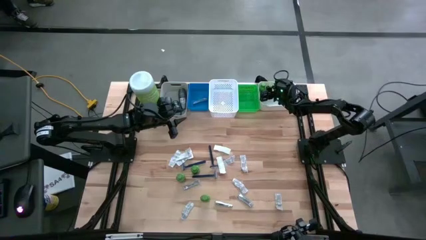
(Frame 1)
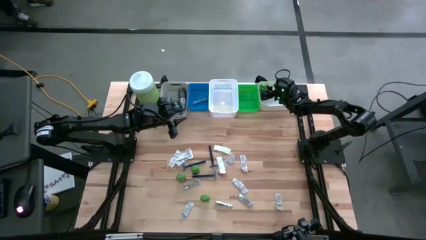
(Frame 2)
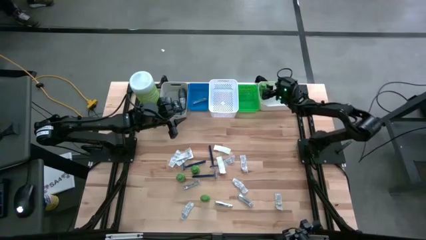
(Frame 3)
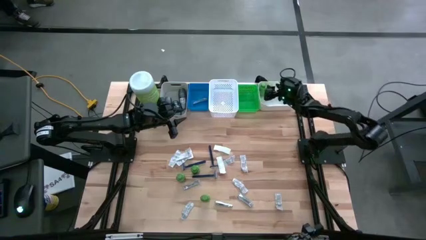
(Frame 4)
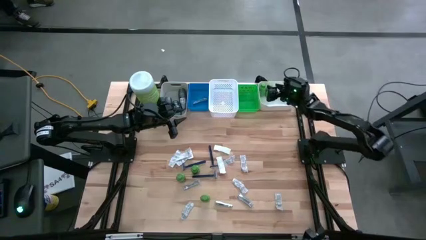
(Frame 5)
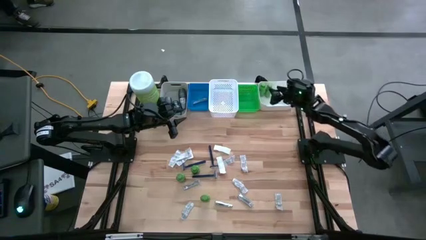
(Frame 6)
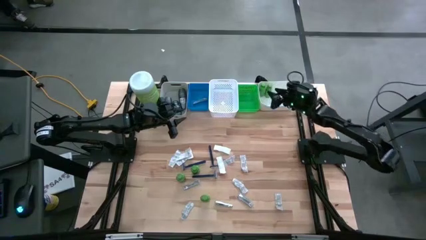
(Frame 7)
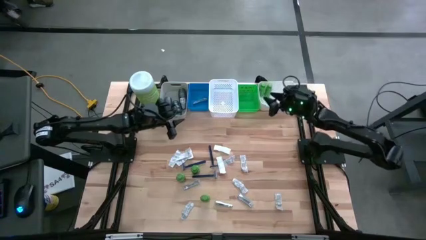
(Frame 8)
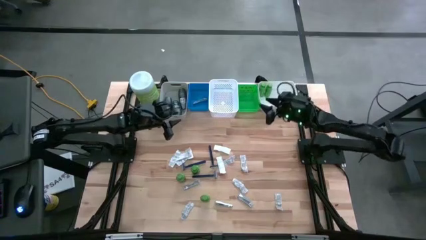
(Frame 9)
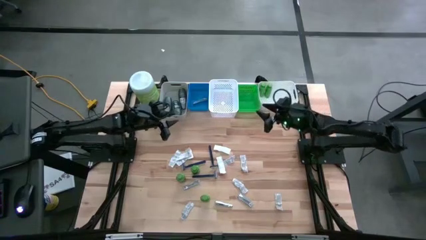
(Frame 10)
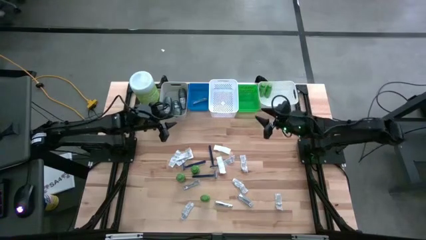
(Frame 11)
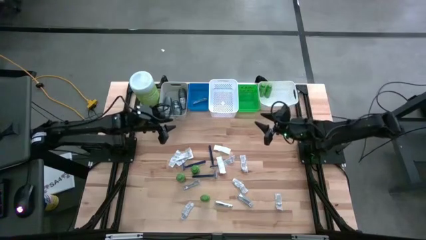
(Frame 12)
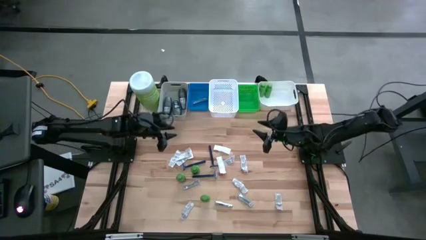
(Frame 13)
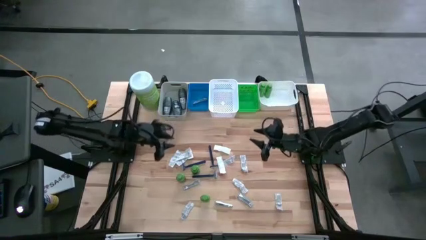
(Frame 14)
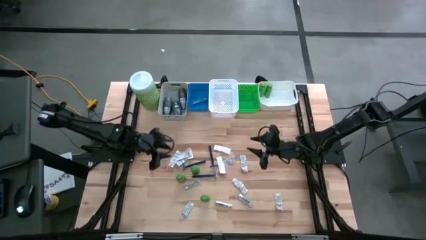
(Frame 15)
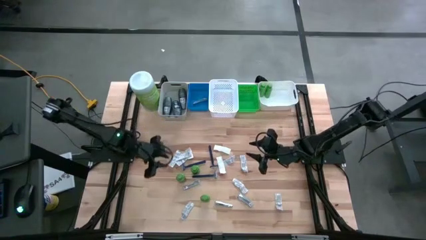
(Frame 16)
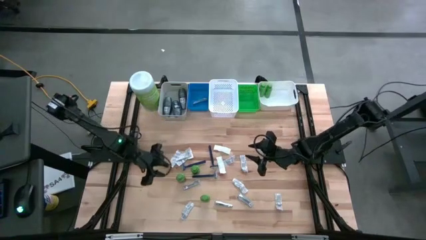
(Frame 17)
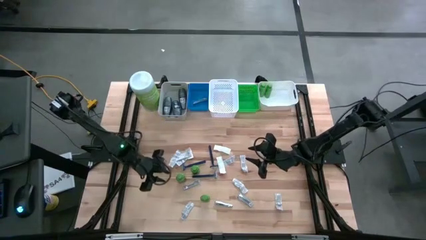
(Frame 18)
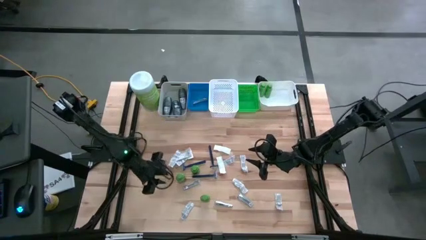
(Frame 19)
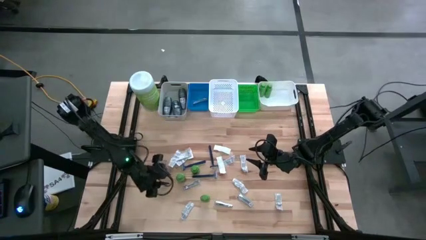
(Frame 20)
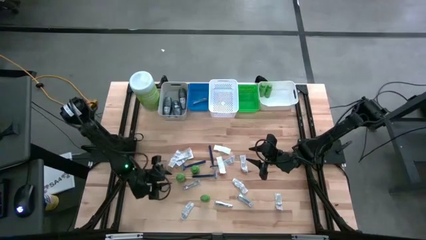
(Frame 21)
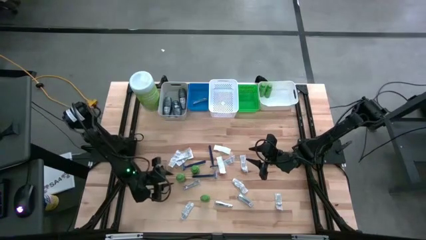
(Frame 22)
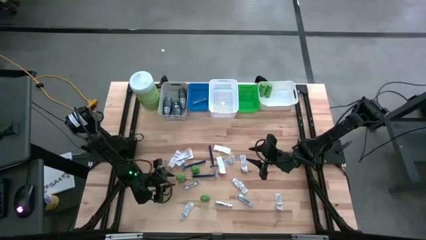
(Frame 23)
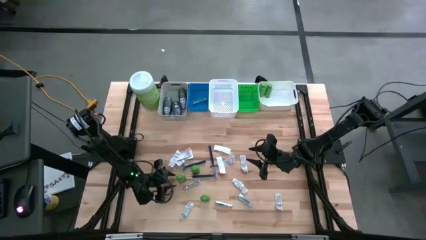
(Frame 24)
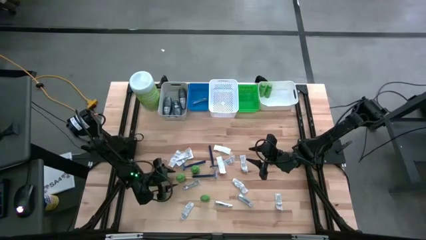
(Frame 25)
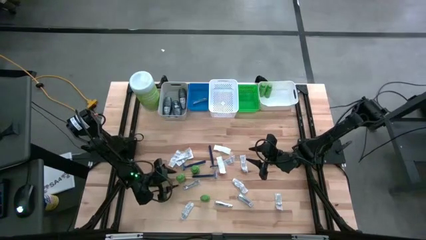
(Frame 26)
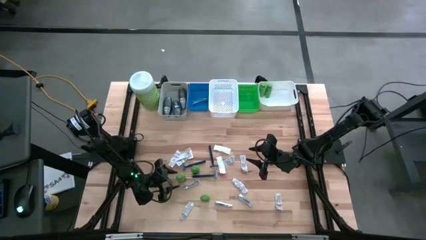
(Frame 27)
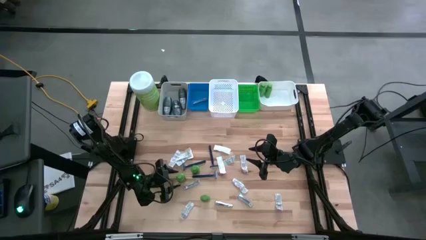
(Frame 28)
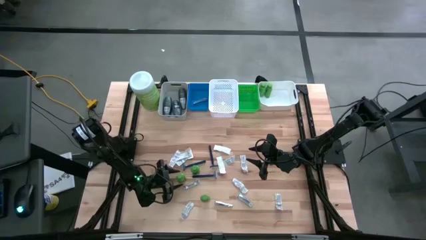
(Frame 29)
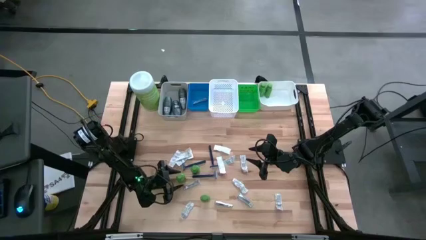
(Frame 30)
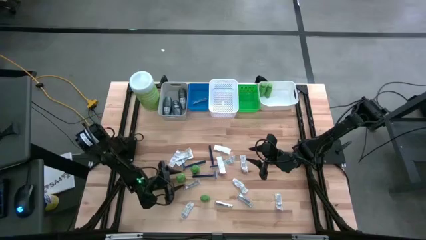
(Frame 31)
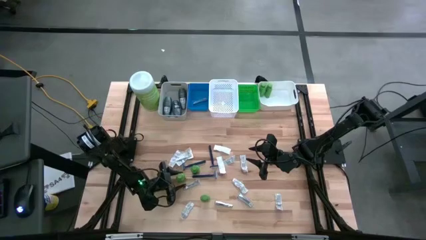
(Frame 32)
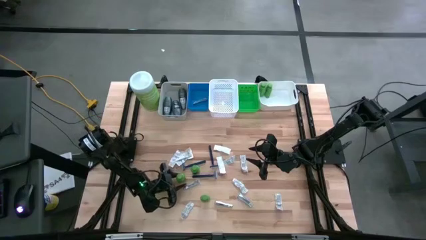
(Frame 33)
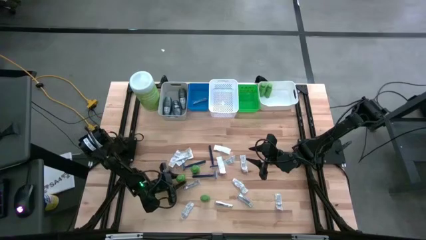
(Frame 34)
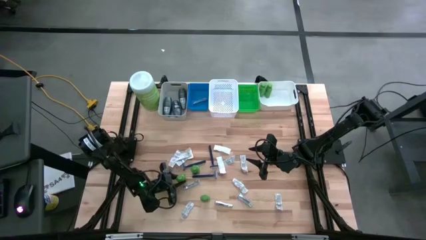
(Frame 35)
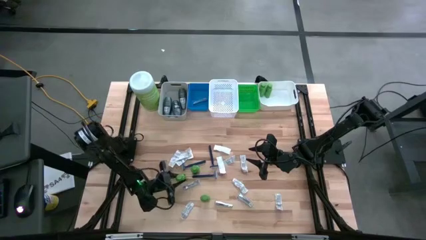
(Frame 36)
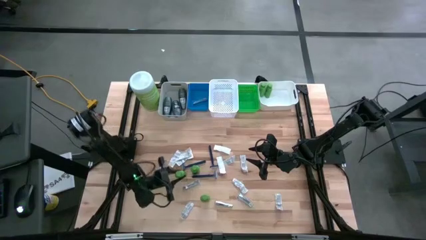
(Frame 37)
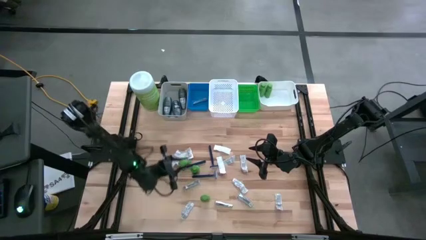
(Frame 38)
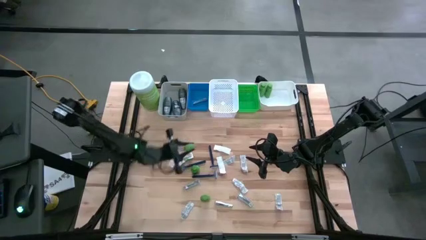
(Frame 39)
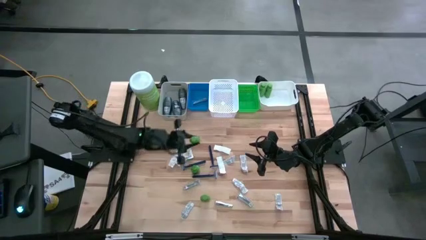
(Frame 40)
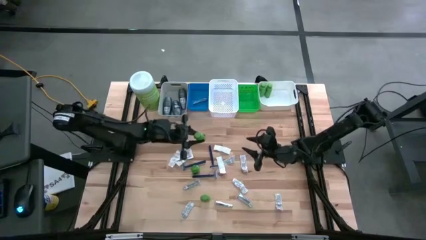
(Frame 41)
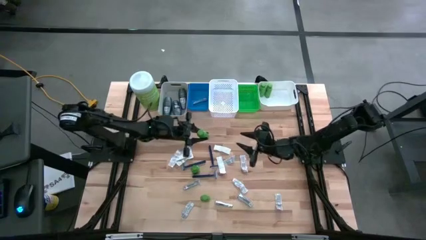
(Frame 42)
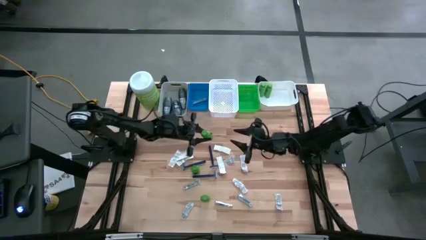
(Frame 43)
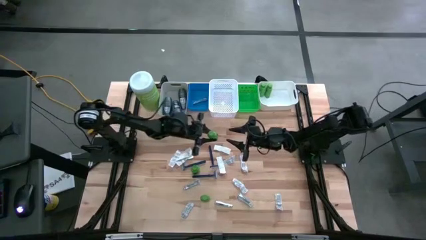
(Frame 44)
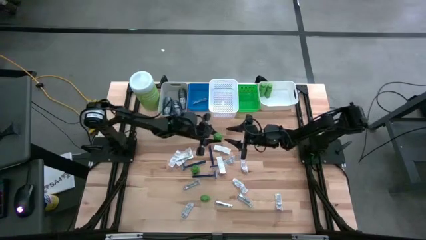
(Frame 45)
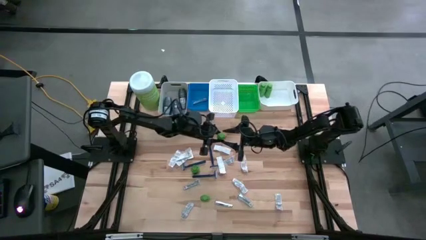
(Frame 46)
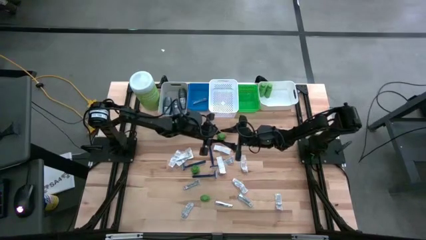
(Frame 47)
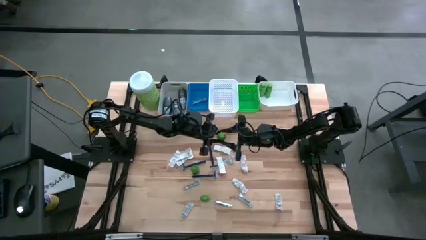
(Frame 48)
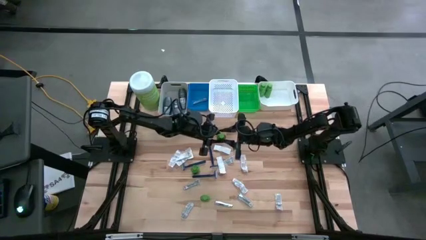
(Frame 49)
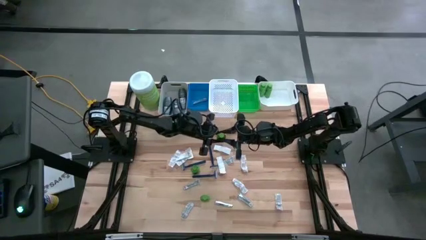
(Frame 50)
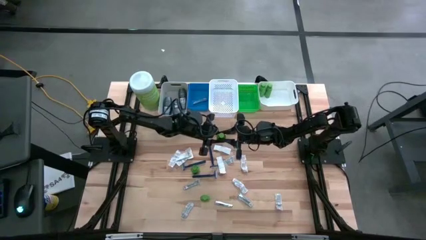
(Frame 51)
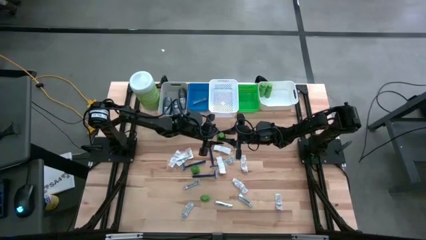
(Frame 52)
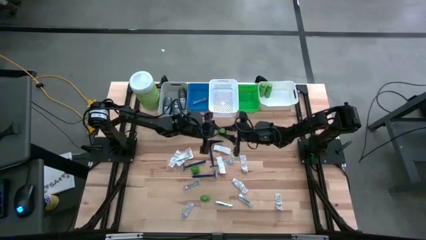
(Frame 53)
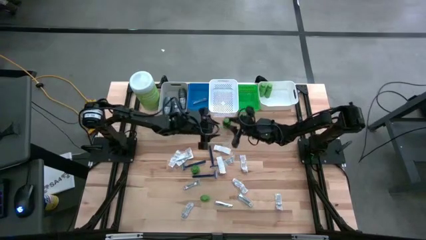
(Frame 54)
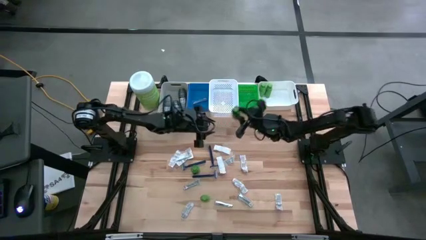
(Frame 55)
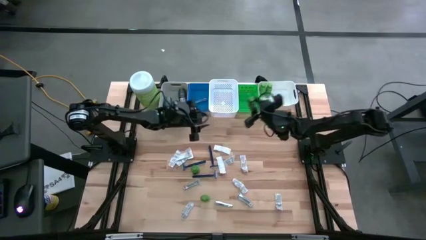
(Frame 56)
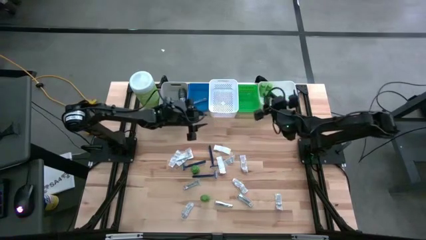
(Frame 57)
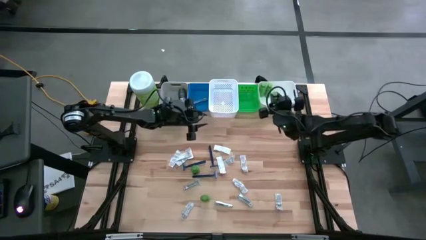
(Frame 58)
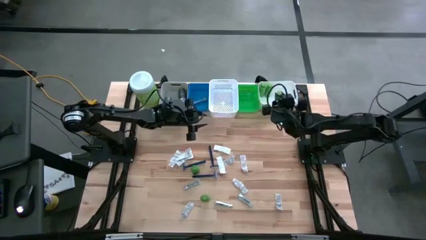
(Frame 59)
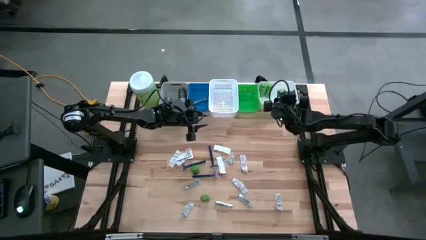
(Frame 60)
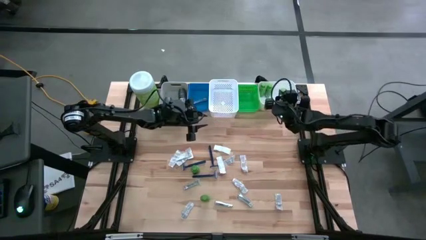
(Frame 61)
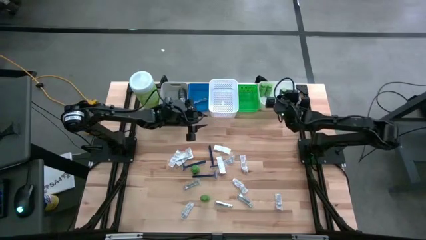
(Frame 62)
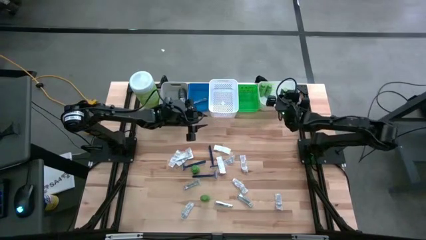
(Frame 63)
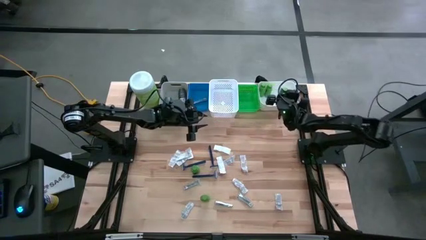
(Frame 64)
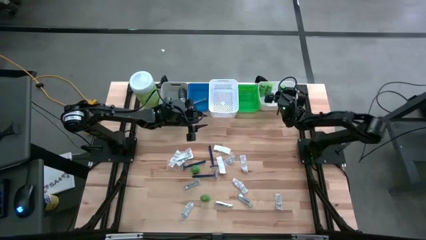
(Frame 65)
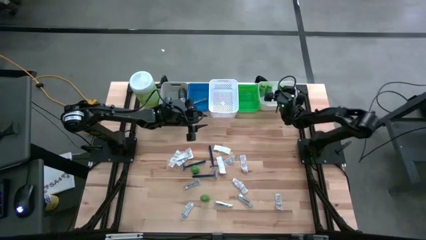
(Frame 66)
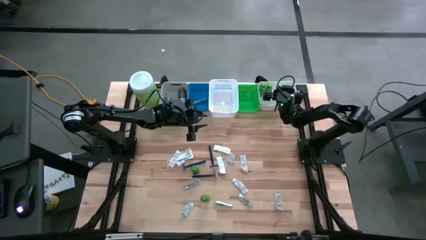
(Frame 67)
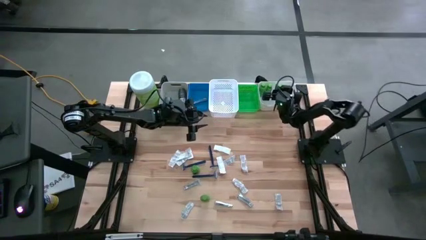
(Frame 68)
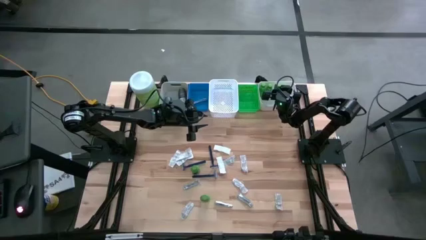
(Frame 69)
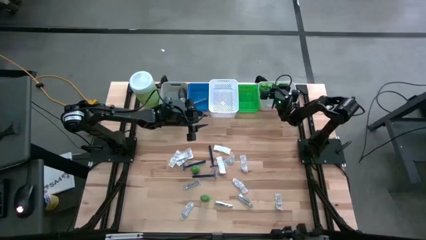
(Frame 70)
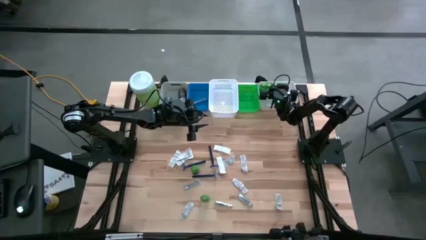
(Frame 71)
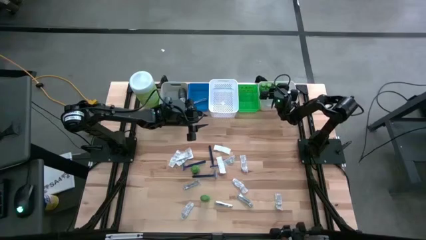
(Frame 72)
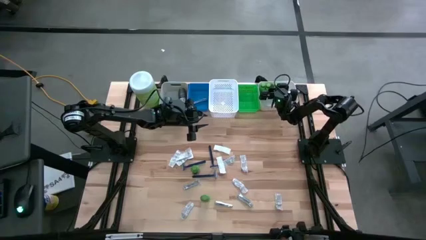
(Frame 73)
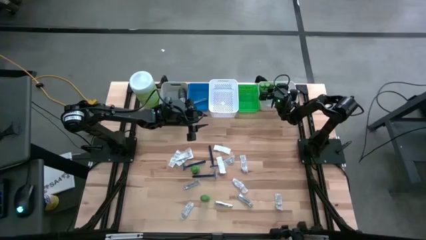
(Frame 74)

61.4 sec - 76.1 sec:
Task: Pick & Place Travel size toiletries
Put the top left green shampoo into the right white bin

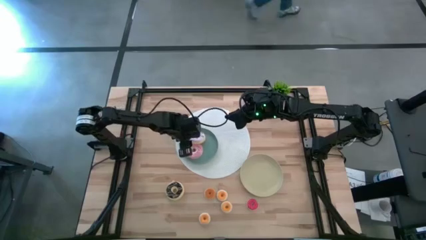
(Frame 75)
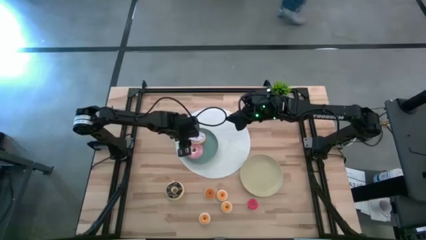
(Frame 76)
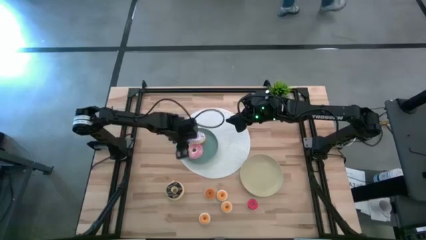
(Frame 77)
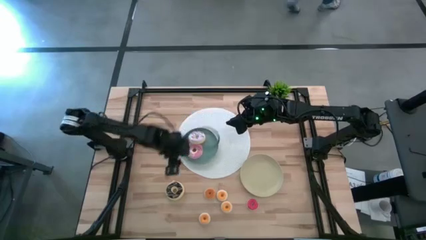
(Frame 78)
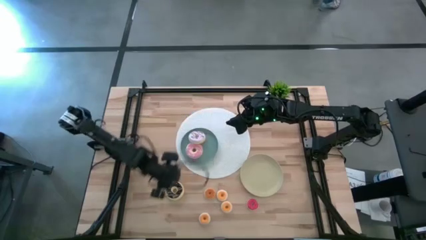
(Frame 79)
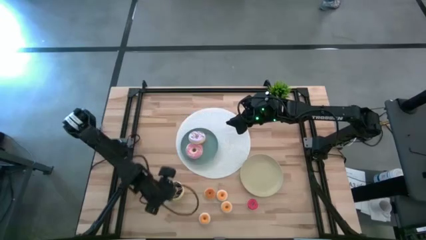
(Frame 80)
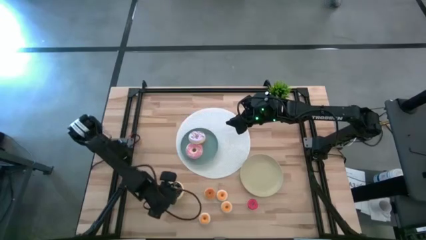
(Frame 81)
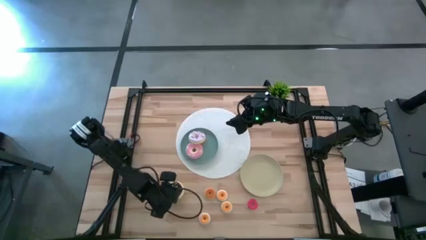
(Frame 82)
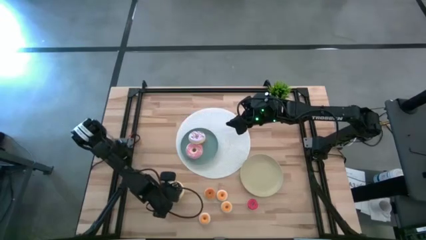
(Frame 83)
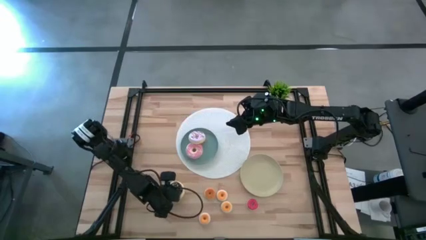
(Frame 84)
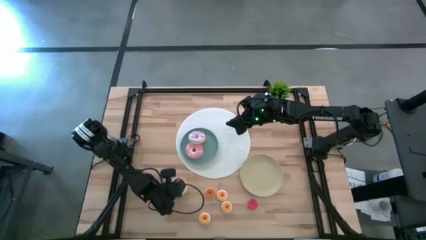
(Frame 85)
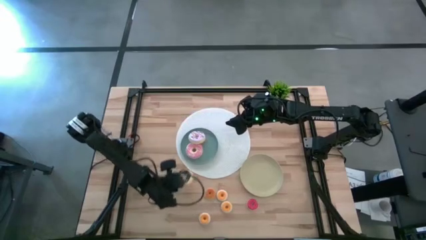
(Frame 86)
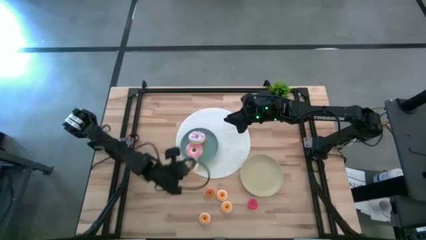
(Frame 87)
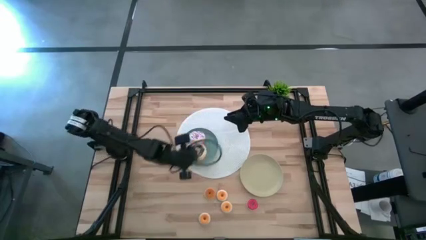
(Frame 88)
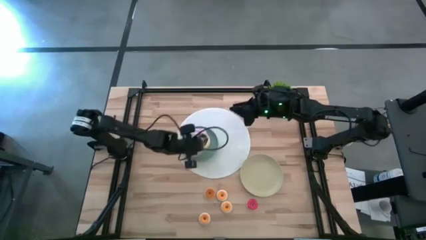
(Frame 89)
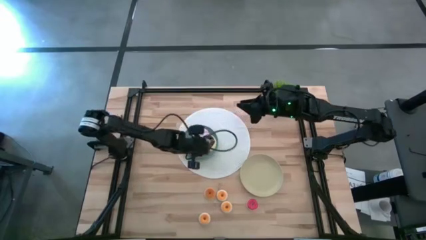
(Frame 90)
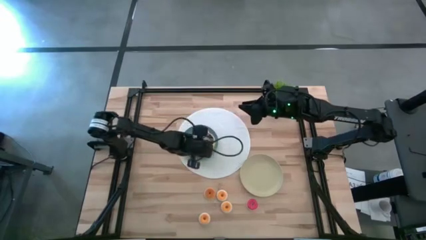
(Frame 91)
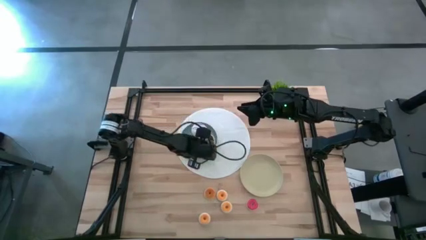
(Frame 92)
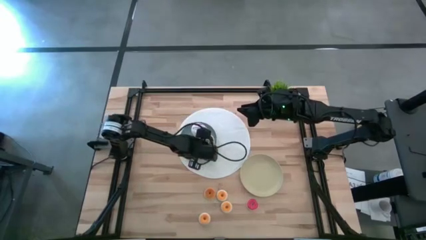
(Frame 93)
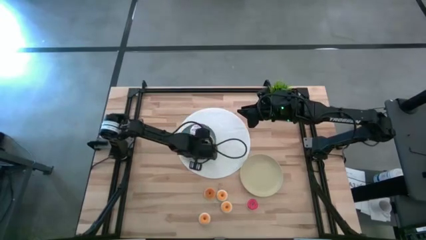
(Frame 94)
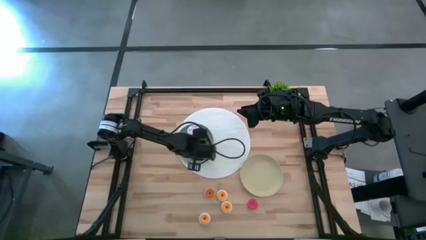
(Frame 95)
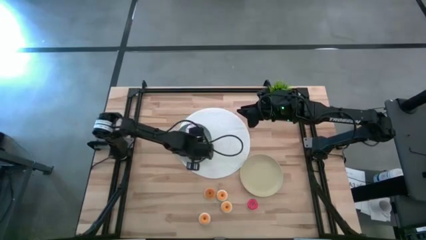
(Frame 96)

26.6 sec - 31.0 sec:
Task: Pick & Place donuts
Put the big black donut on the blue plate
